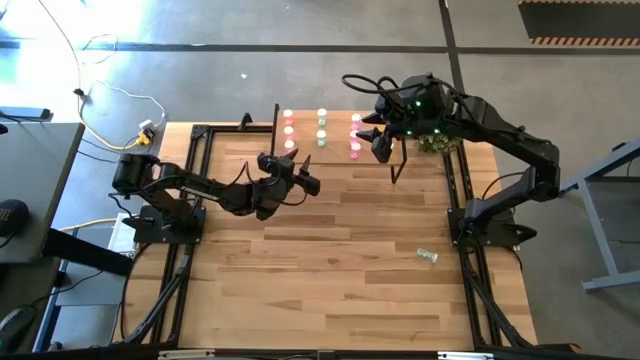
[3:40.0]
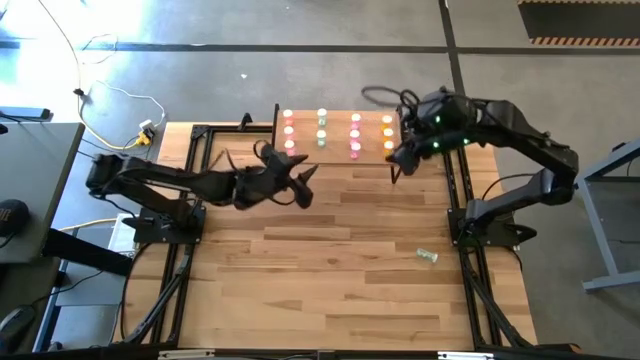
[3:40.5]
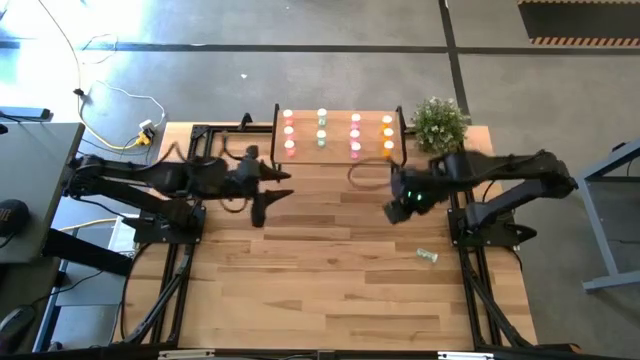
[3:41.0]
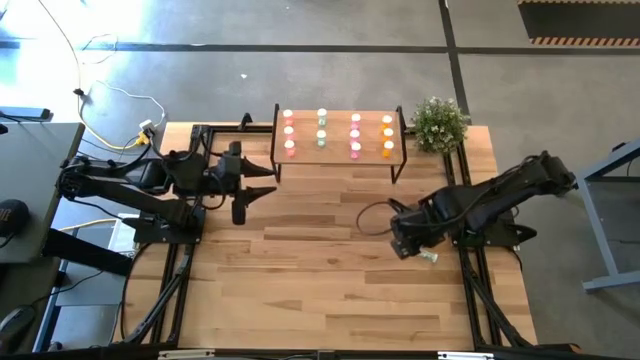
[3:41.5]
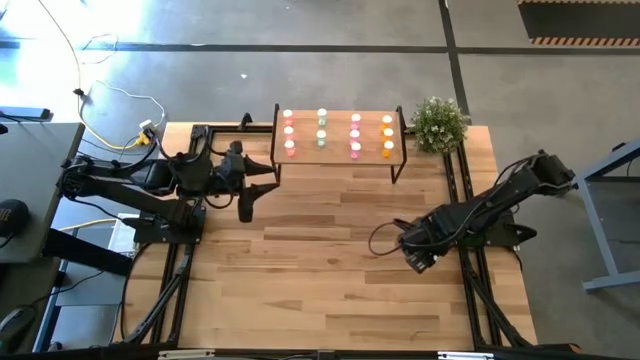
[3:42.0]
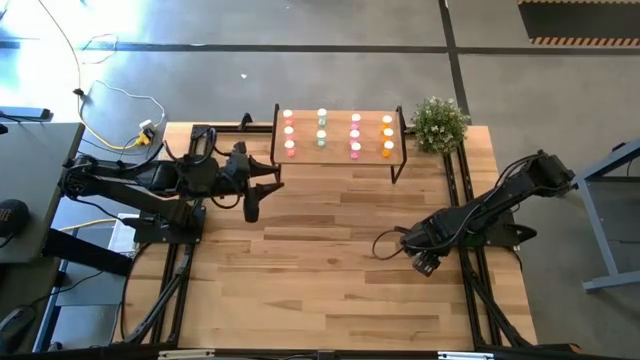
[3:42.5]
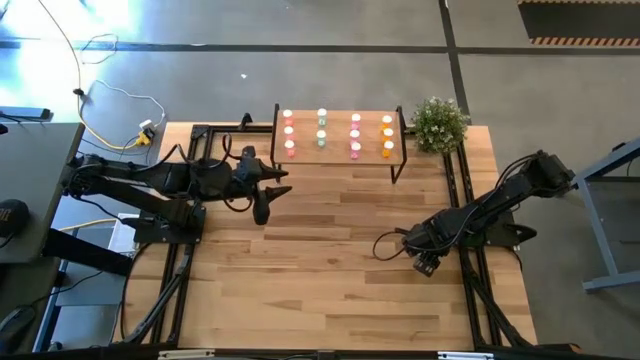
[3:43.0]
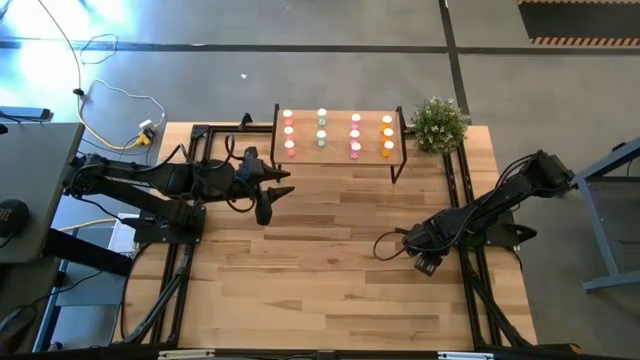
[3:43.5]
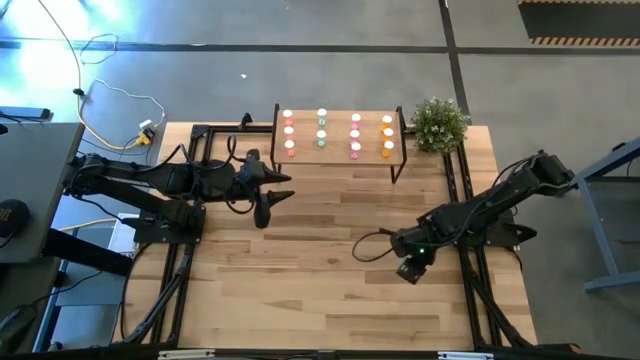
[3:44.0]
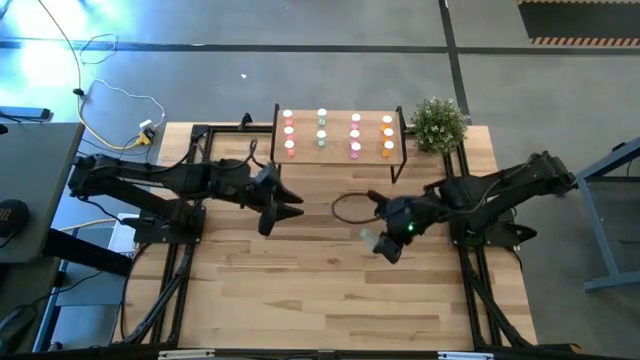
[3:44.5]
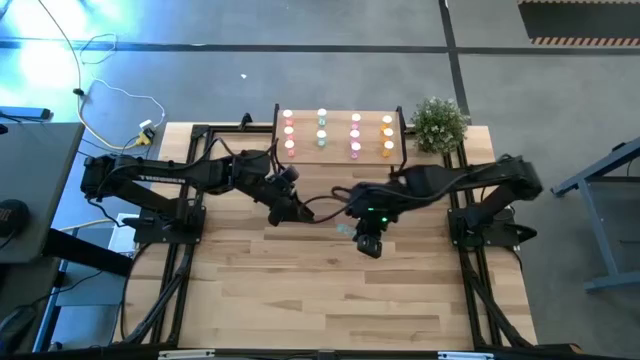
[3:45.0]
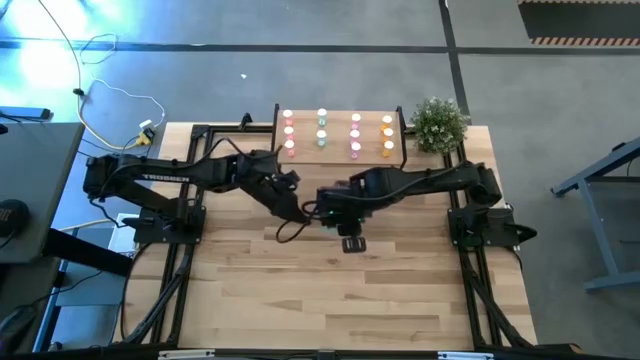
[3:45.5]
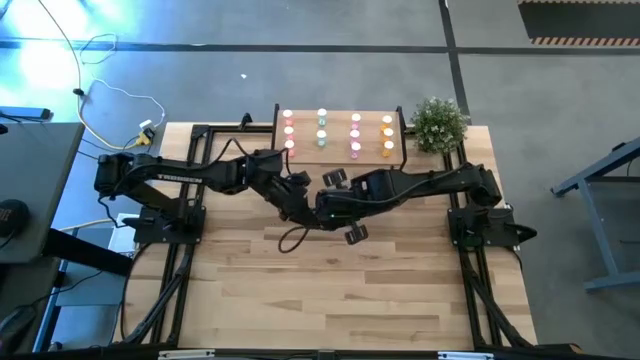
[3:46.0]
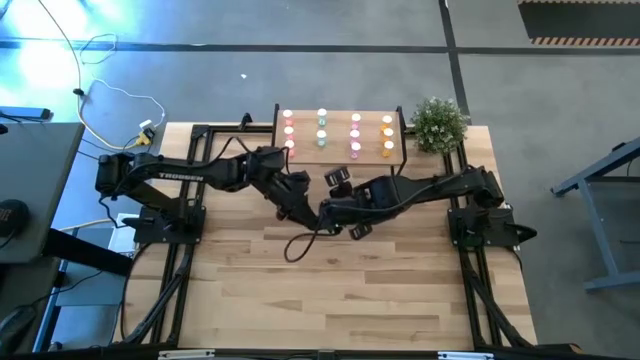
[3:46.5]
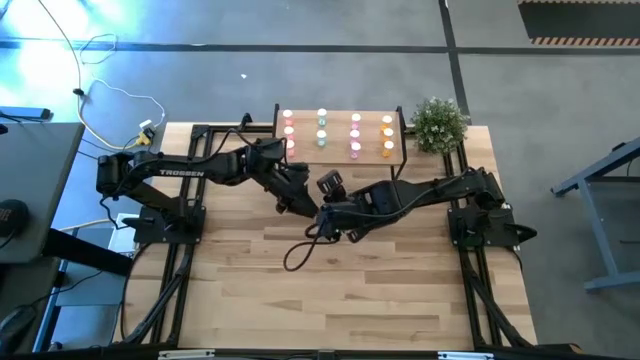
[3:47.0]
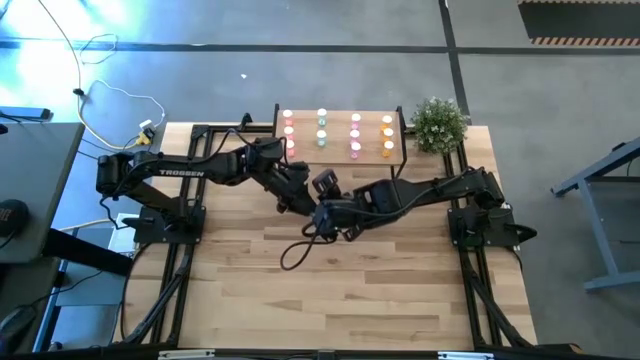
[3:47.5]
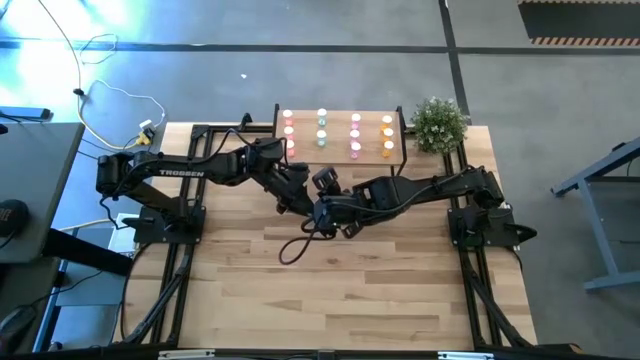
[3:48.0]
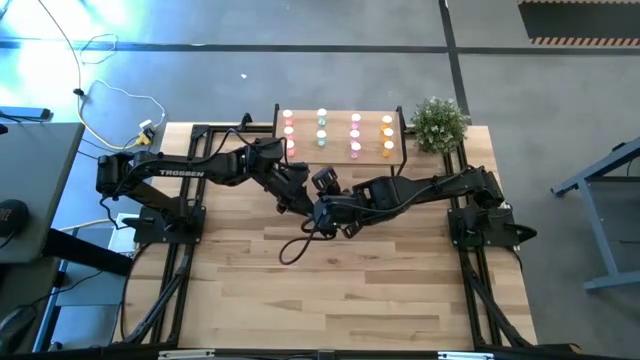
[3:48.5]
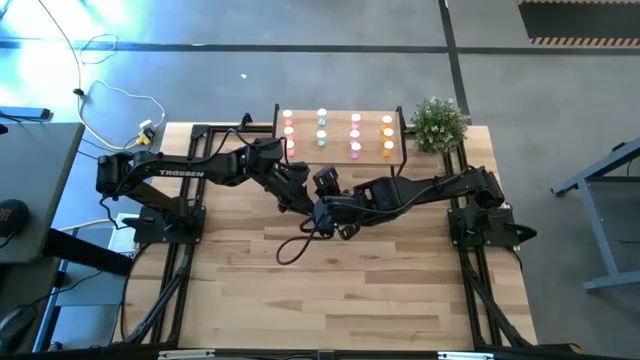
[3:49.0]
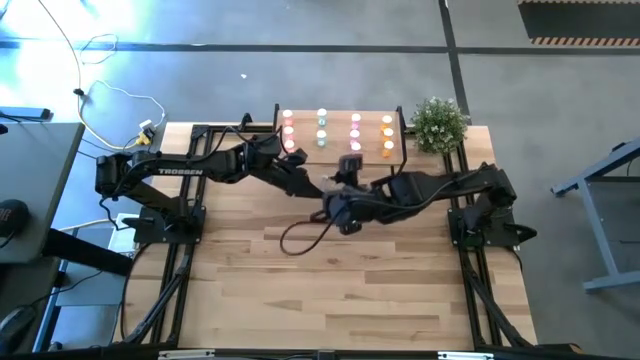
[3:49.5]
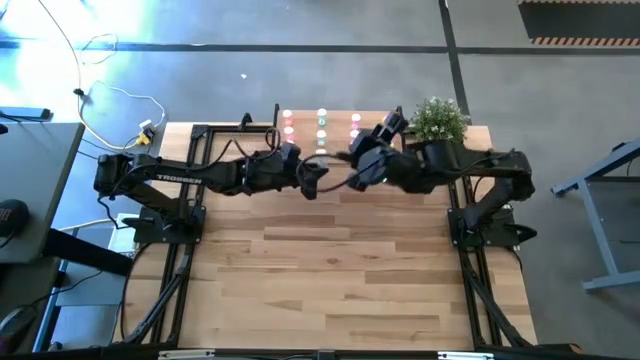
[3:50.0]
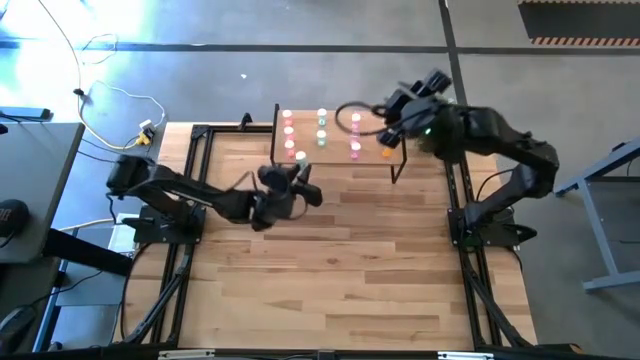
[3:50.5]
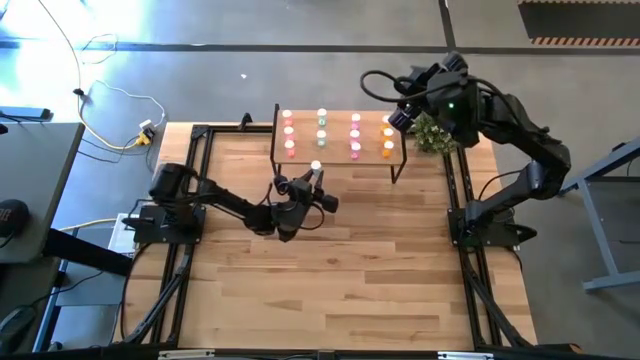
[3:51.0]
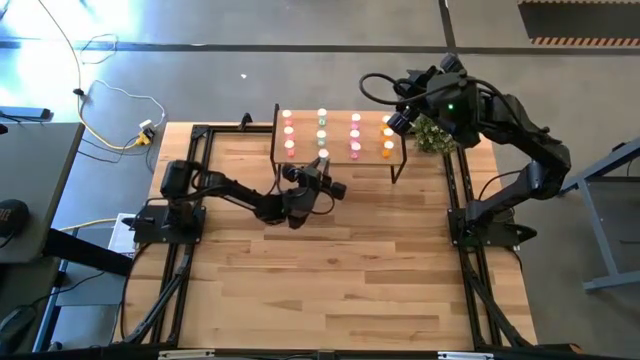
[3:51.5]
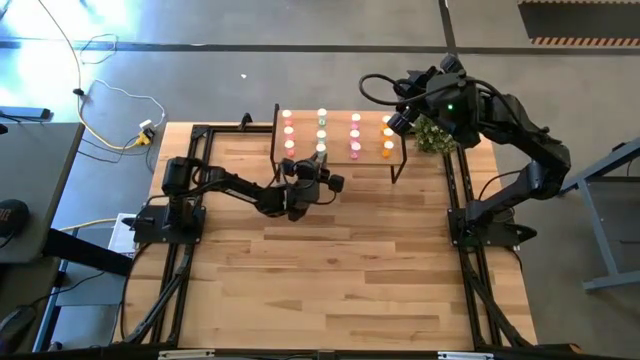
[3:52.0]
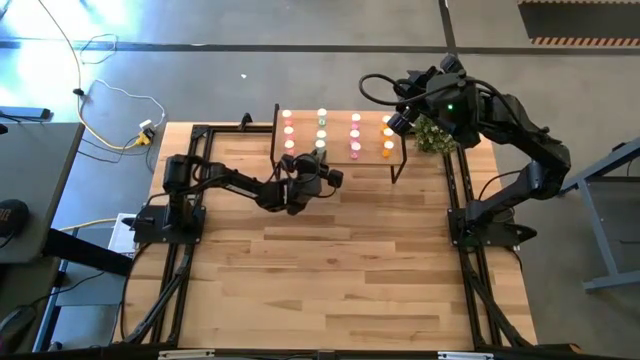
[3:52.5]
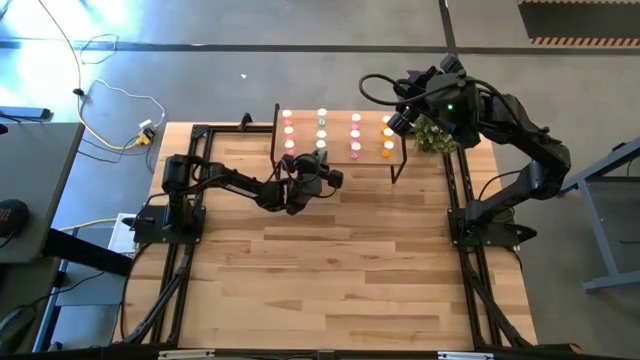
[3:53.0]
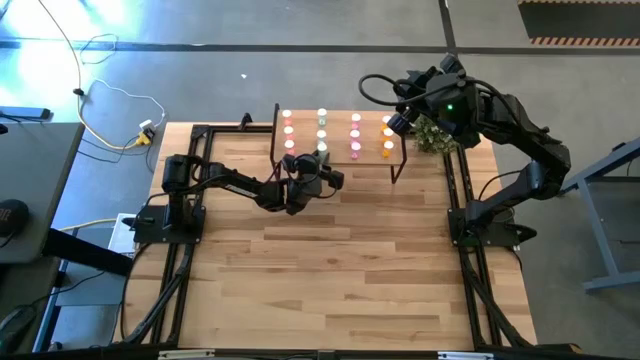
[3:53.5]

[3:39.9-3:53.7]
Task: Pick and place medicine bottles onto shelf by color
Put the blue pill bottle on the shelf aligned with the other blue pill bottles

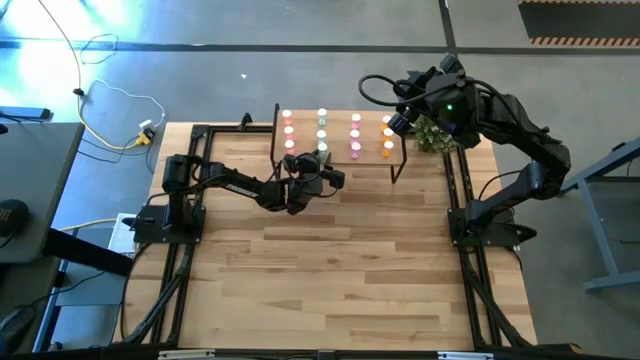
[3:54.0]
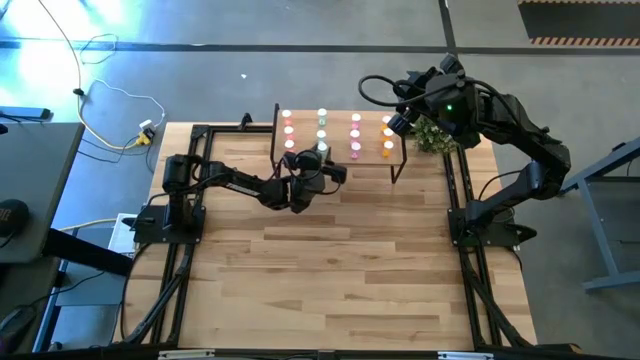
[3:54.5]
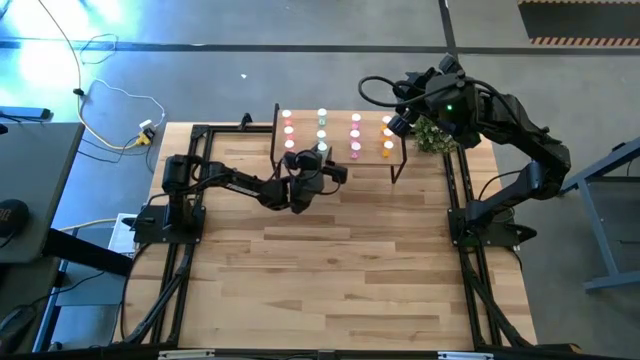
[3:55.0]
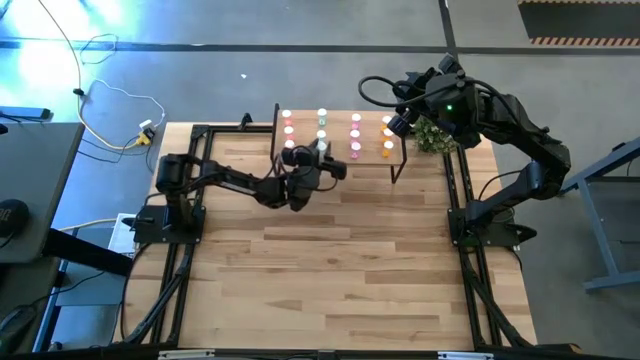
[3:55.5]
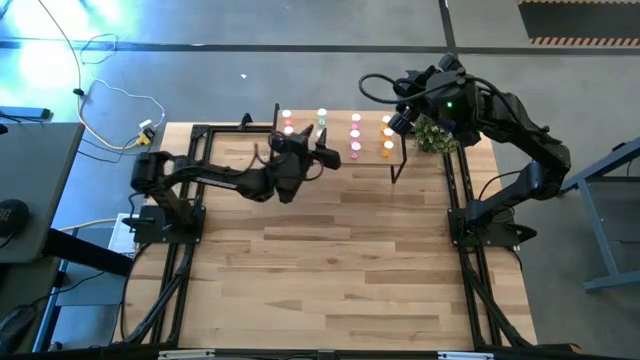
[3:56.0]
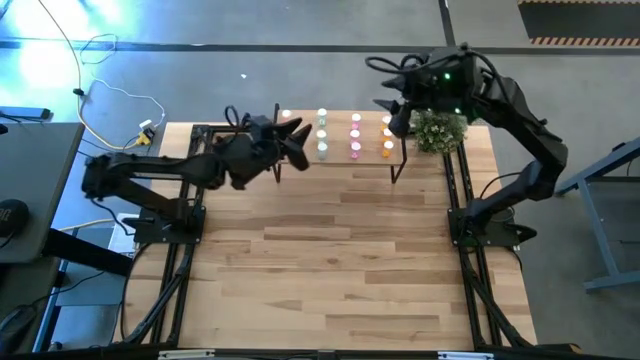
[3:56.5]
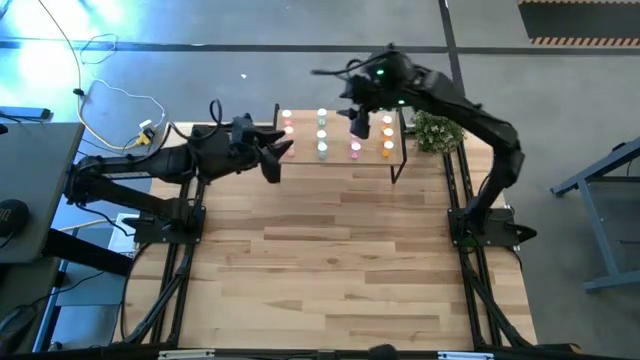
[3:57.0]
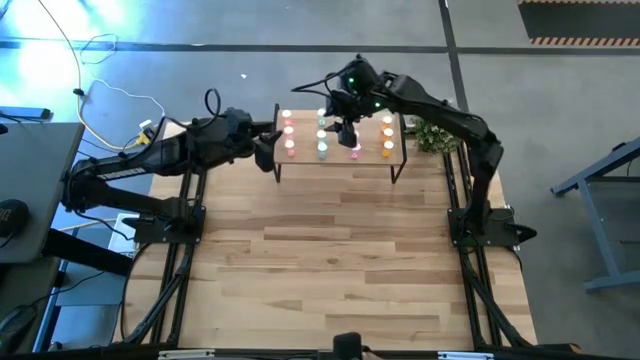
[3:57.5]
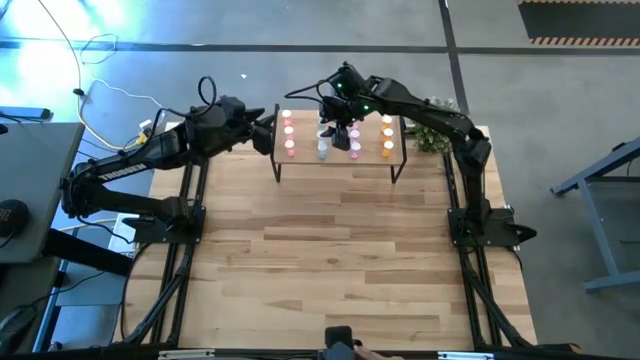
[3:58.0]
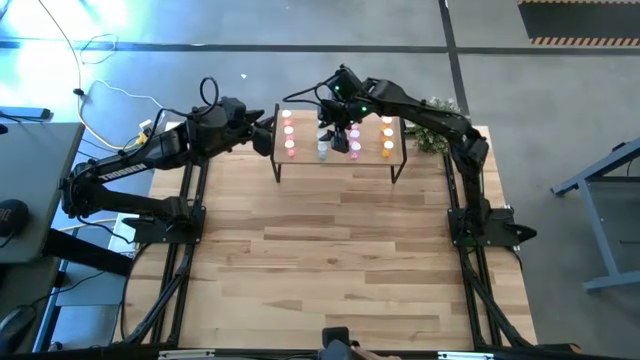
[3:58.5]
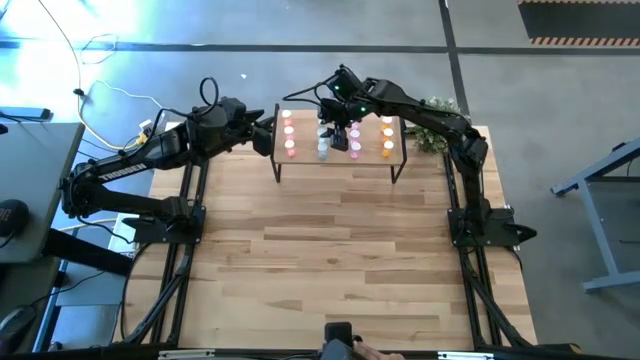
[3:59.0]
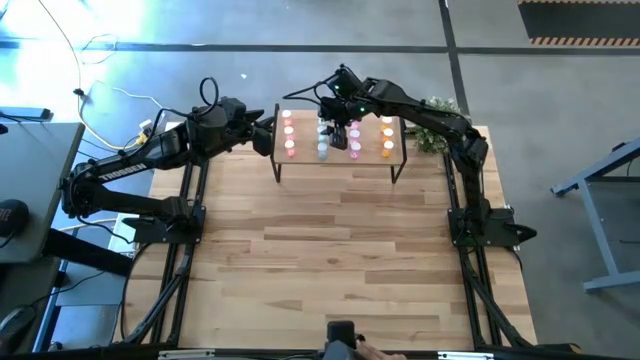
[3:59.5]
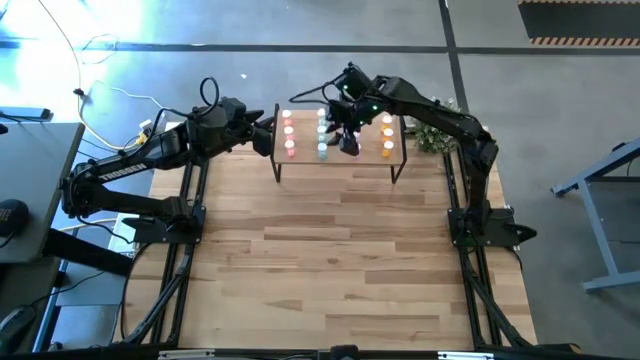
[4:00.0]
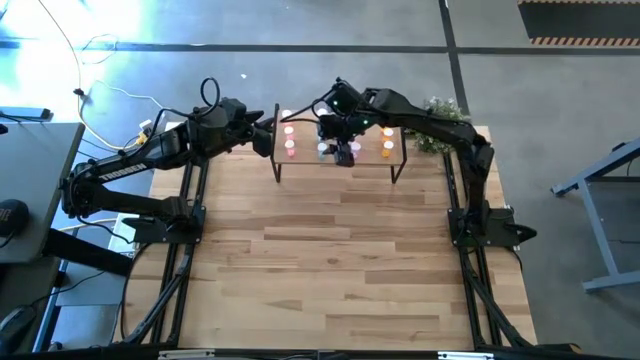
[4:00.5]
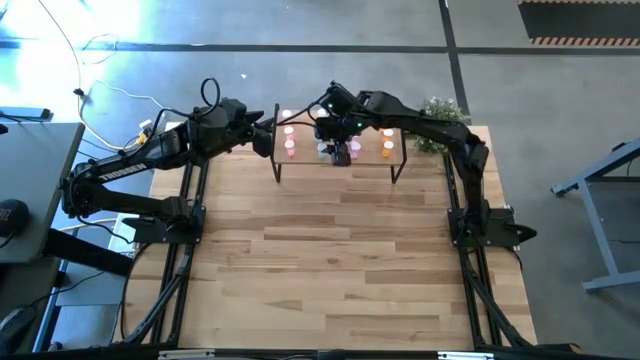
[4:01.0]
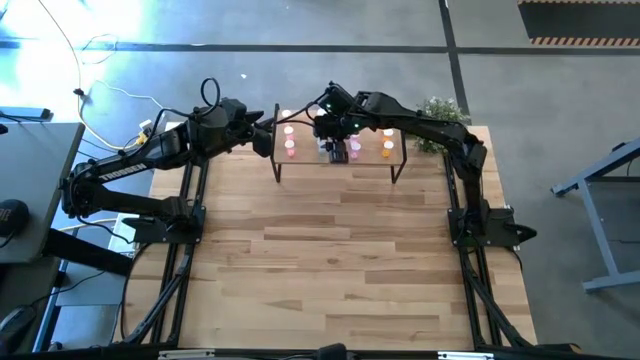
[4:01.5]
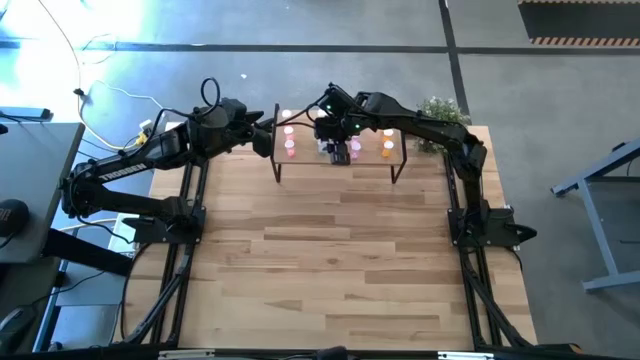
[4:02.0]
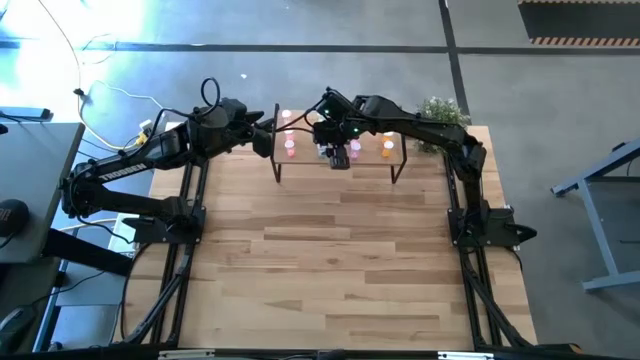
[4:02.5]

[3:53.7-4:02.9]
Adjust the blue pill bottles on the shelf
